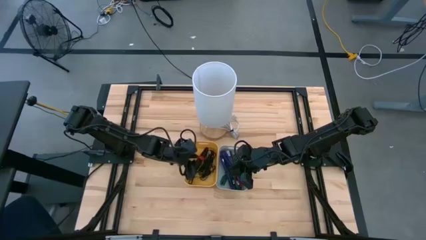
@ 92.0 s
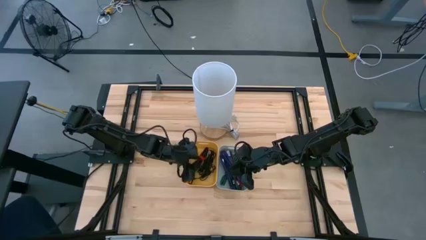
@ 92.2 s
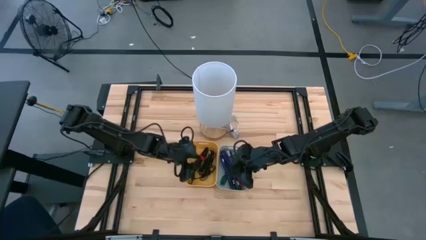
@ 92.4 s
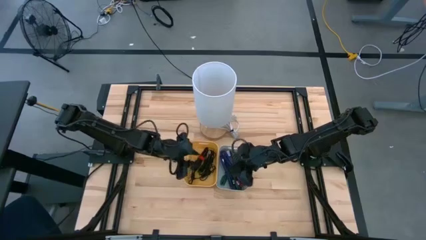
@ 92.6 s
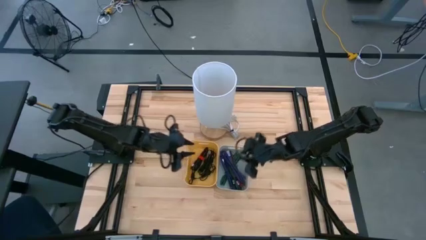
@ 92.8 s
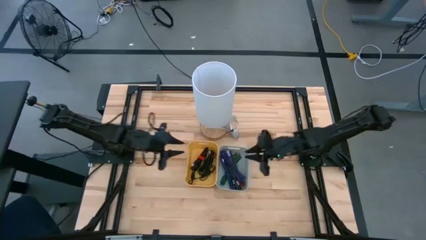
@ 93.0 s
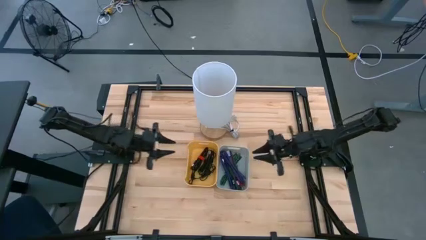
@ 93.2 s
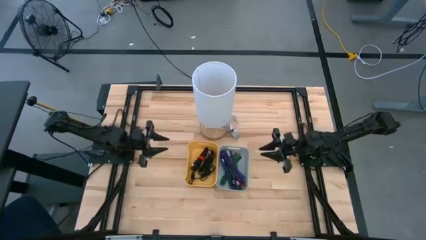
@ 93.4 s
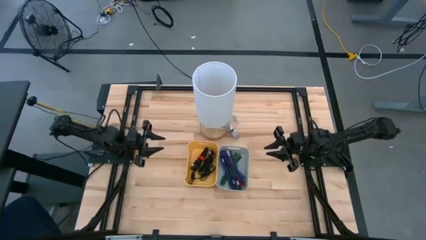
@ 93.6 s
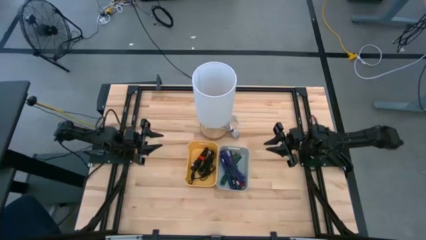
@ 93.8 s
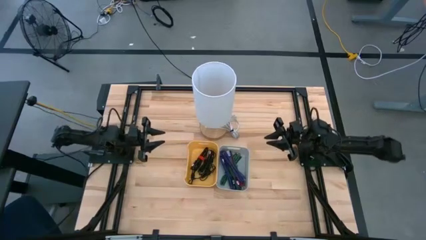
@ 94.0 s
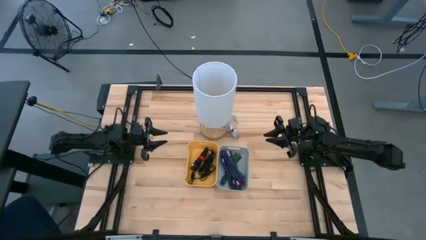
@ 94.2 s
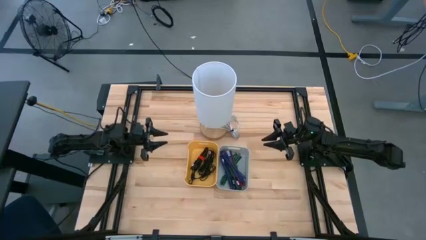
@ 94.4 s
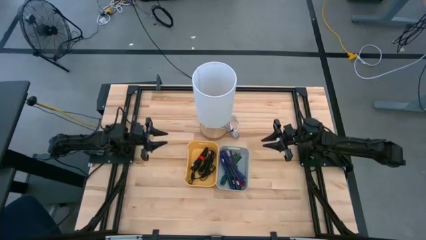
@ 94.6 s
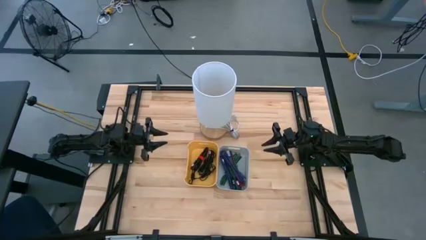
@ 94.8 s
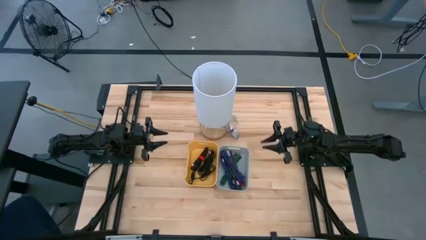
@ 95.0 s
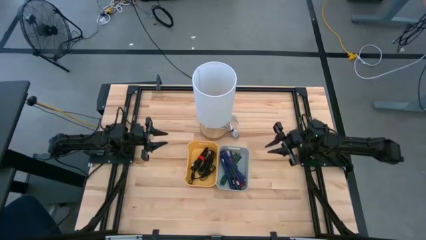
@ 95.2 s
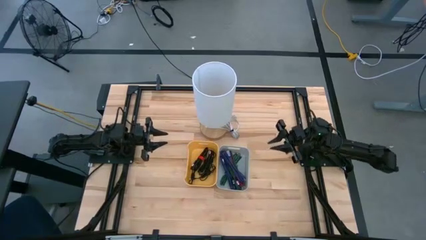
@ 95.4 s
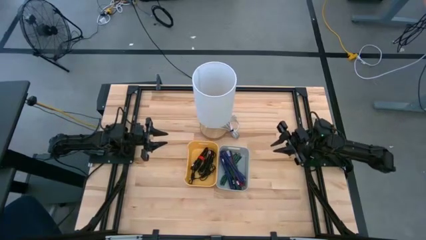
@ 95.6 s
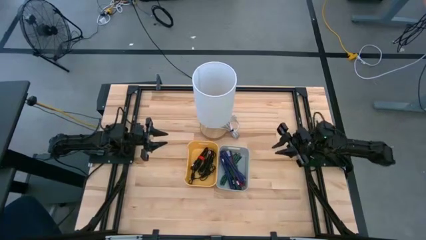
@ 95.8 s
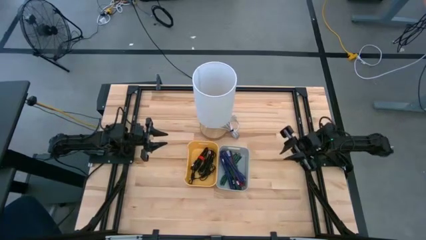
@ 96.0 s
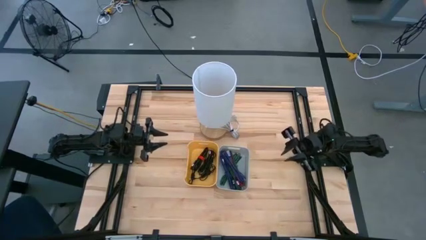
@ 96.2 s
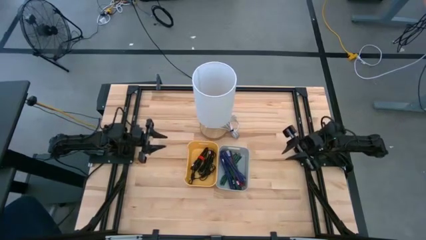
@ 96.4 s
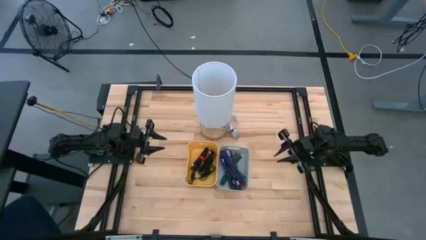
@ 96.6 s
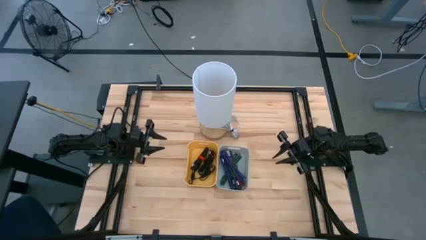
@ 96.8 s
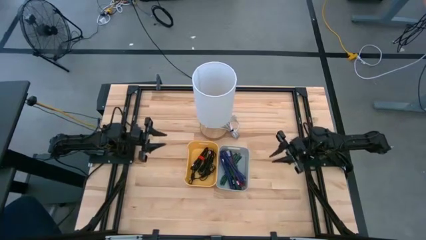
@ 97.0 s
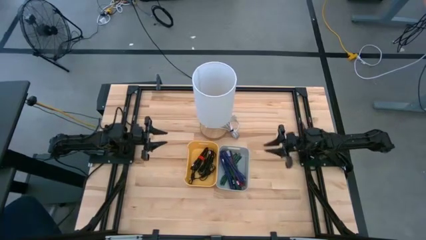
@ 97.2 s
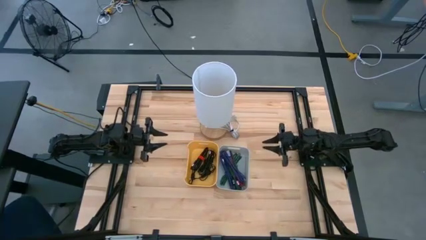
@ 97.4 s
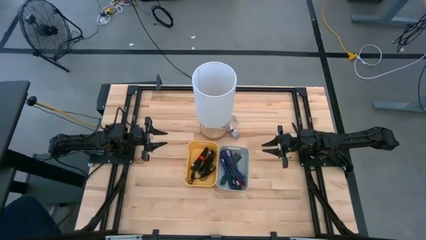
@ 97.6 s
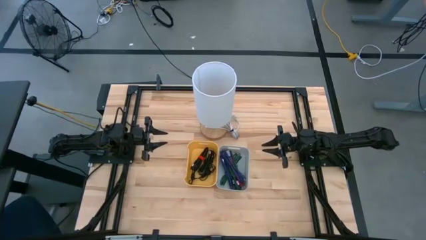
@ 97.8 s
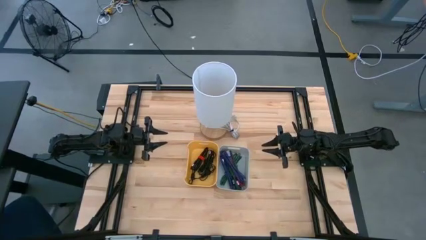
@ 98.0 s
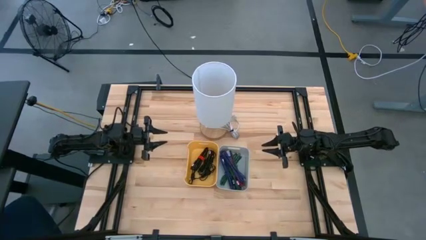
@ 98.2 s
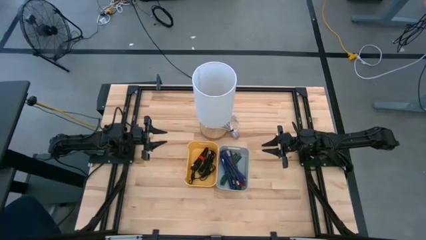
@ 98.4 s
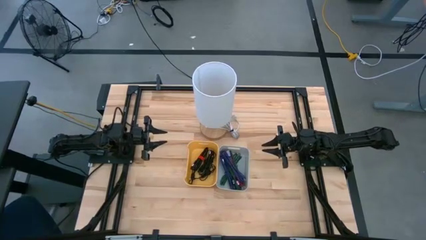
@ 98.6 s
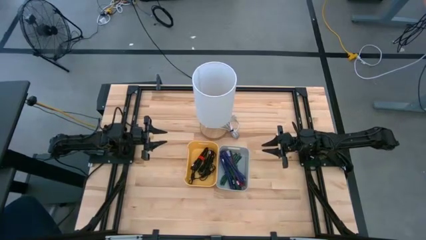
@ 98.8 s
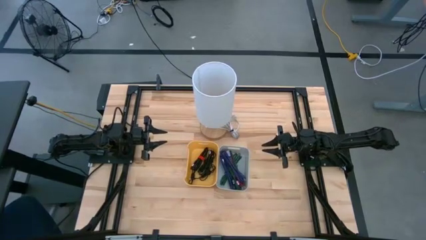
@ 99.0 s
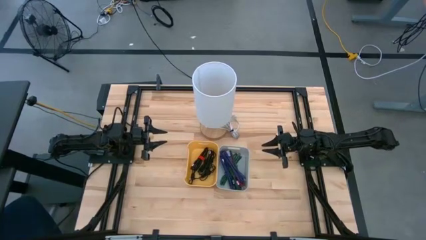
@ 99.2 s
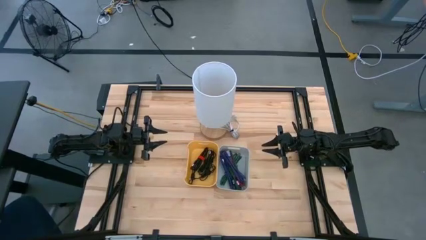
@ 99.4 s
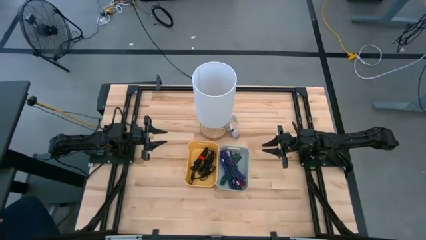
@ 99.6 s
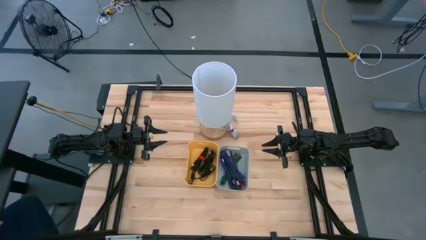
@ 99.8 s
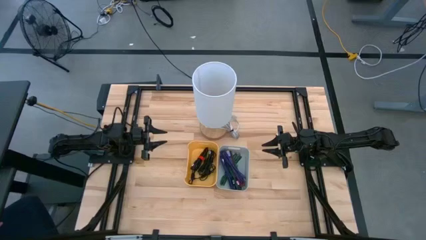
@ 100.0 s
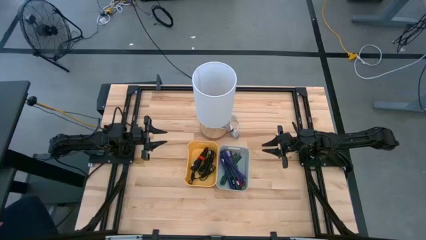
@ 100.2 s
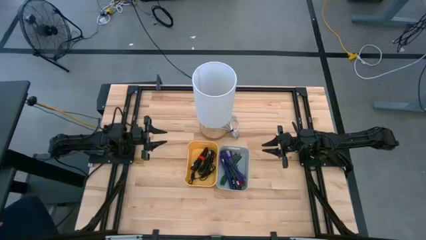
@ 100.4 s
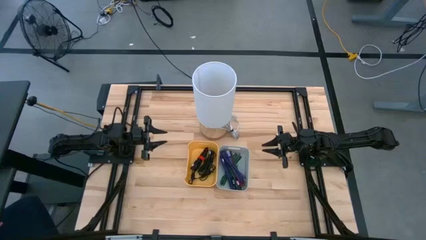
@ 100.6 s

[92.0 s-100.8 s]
Task: Pick & Place USB Port
Return to Home Position

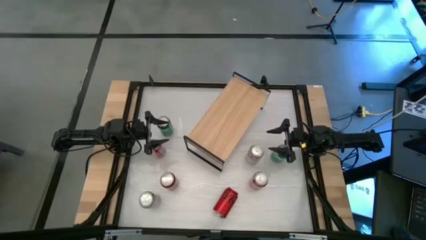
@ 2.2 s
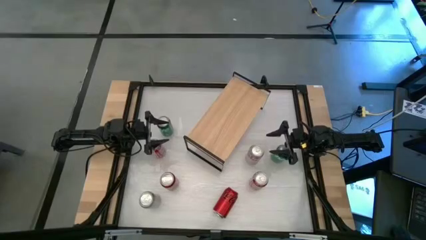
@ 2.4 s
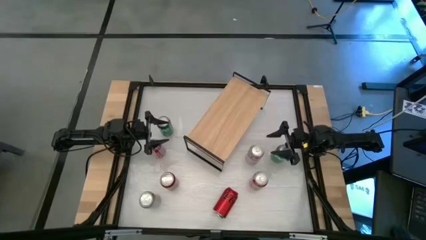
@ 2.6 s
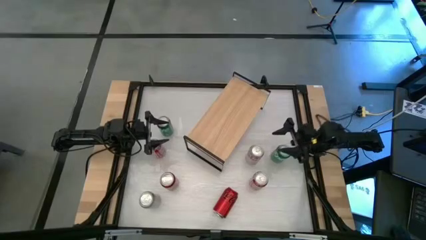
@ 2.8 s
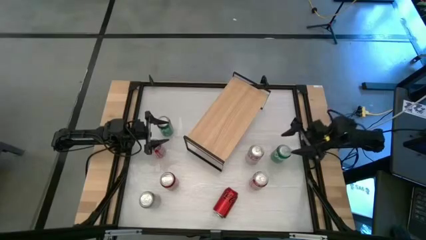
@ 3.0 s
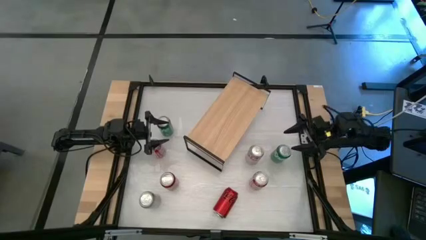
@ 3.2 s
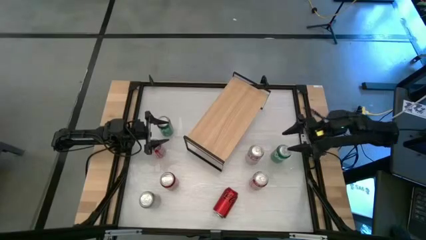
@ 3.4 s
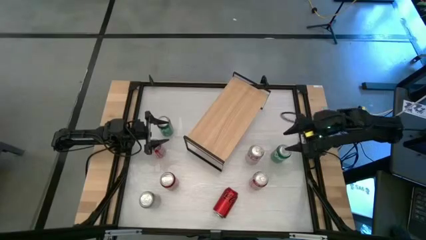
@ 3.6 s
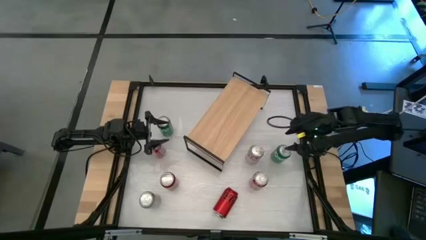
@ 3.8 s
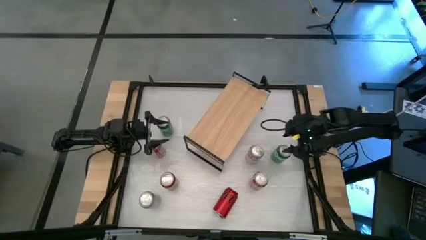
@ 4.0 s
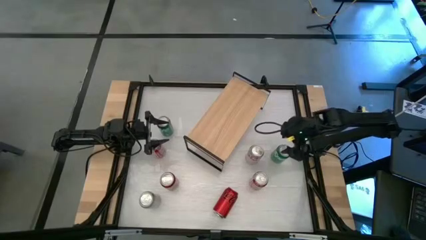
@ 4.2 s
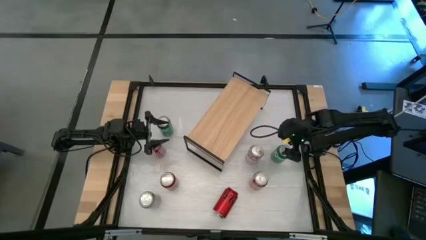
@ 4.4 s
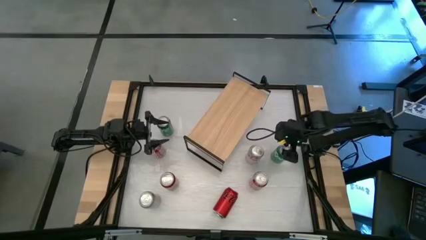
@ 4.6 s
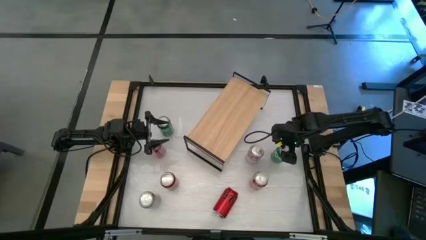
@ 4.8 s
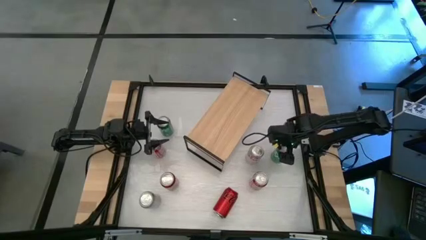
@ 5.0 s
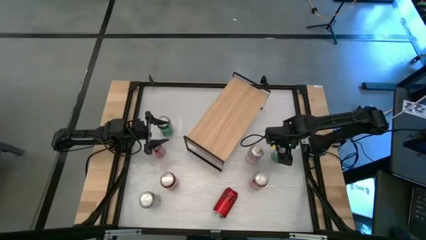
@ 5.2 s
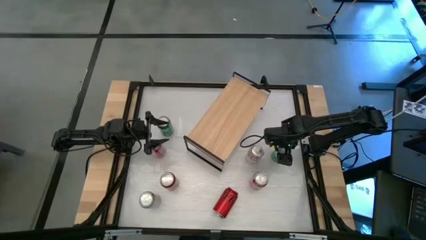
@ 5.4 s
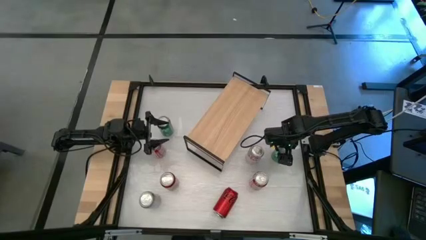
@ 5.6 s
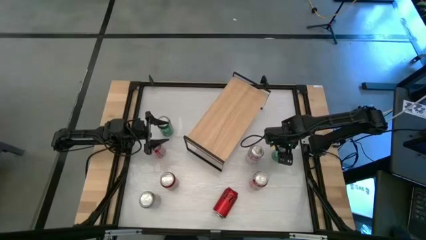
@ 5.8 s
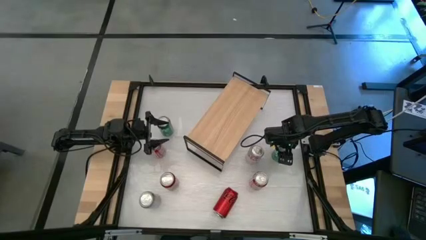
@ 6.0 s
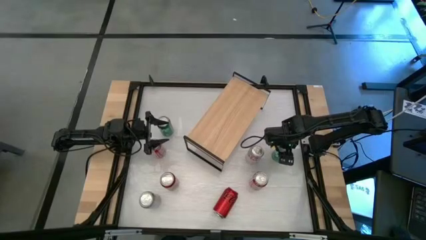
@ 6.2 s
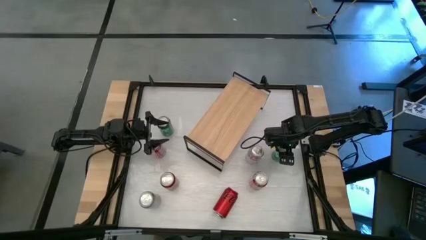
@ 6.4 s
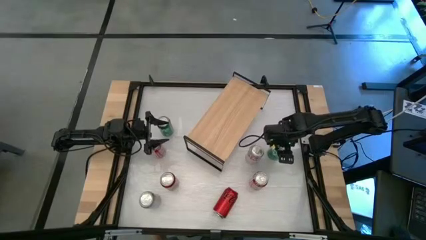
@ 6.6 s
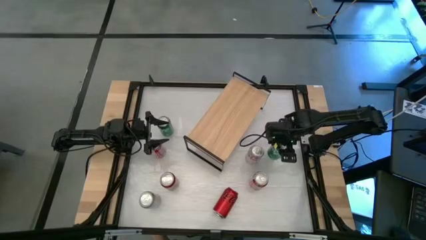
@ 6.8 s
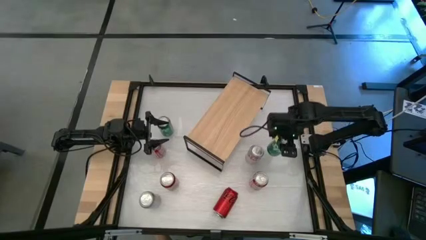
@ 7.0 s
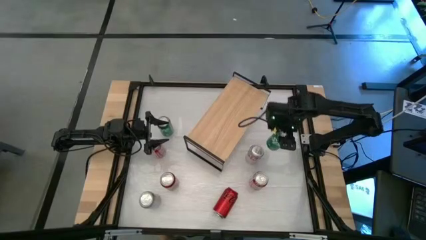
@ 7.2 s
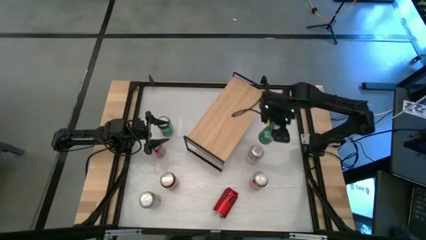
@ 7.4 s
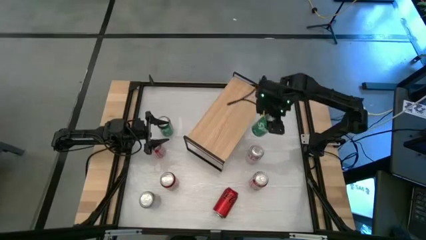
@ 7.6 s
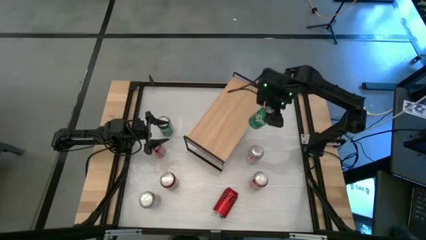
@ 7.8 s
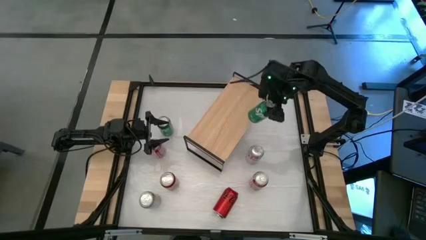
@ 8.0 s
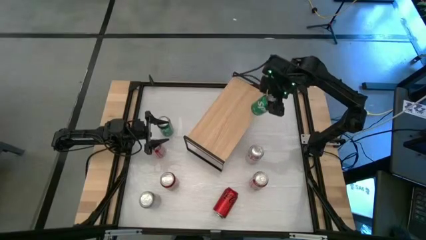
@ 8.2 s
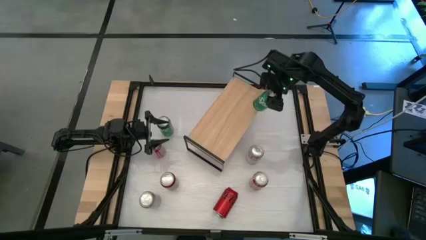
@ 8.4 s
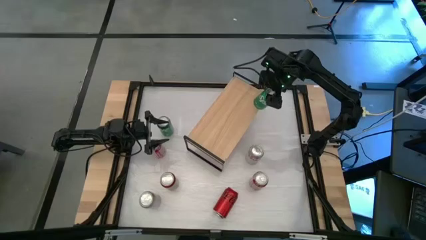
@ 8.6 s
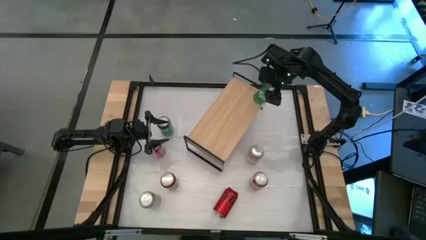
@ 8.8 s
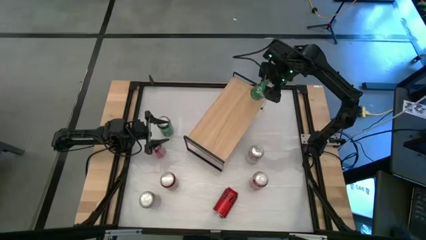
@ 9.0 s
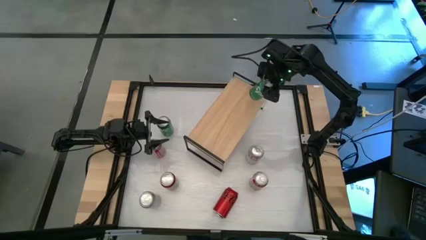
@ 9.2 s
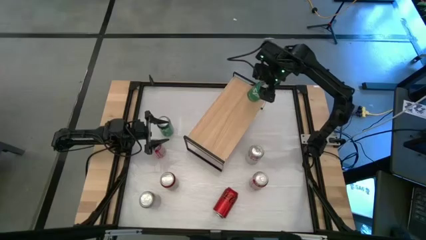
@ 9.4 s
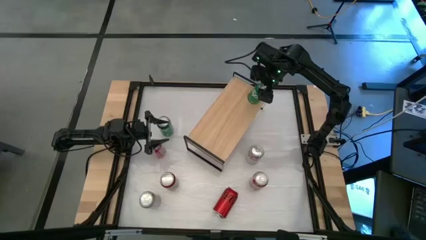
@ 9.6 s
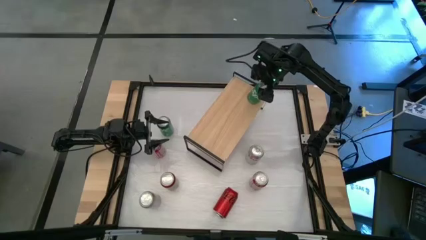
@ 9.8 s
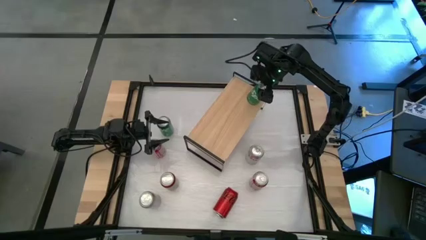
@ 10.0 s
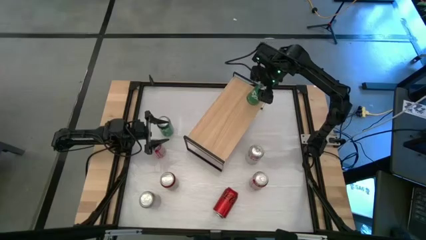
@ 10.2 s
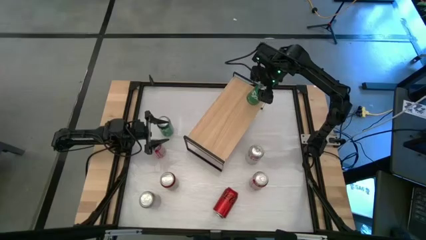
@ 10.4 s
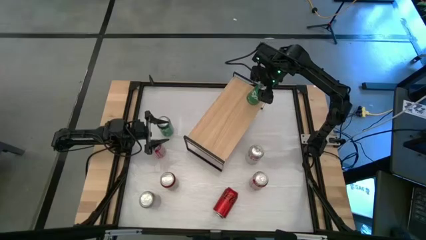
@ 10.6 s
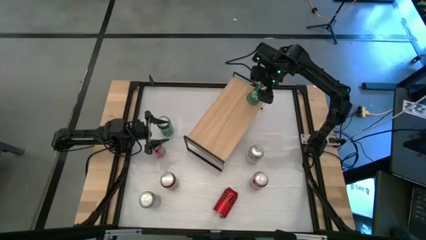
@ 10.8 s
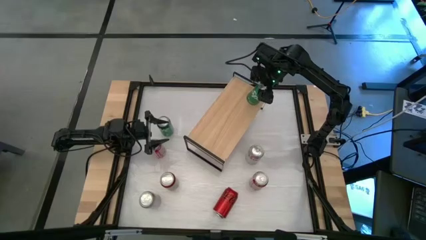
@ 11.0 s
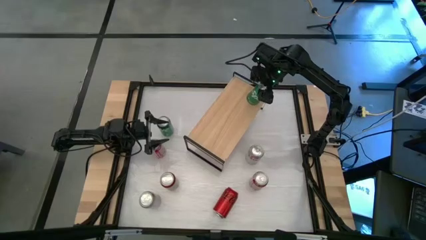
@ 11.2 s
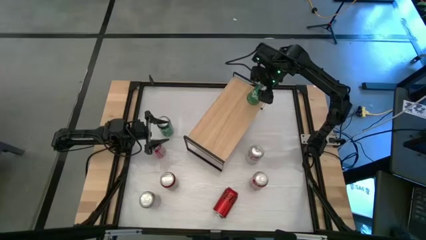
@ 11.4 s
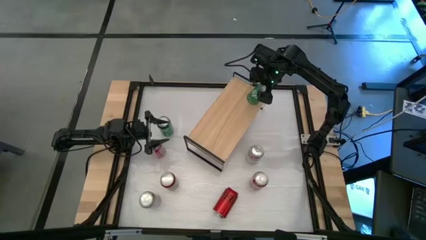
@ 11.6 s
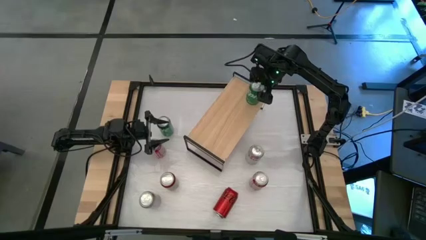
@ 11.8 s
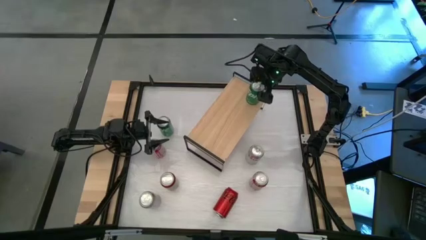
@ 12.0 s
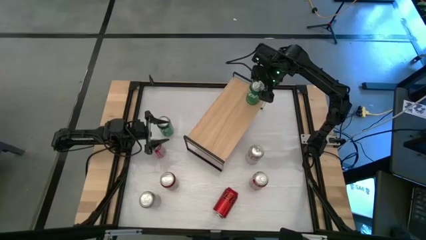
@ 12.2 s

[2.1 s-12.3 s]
Task: Place canned beverage on shelf
Put the right green soda can on the shelf
